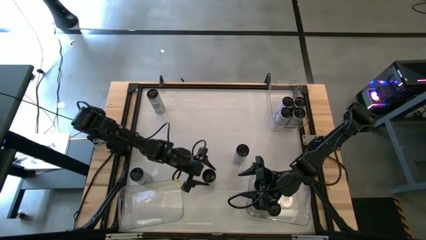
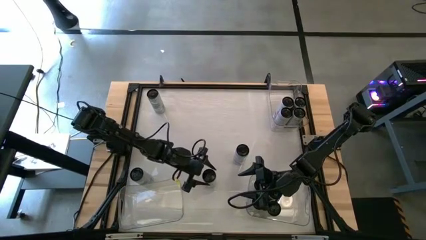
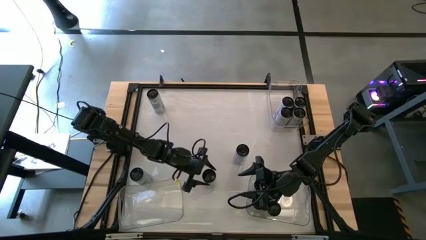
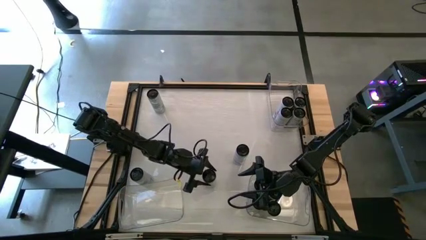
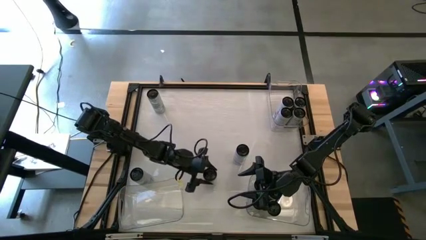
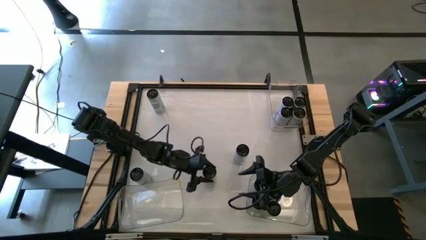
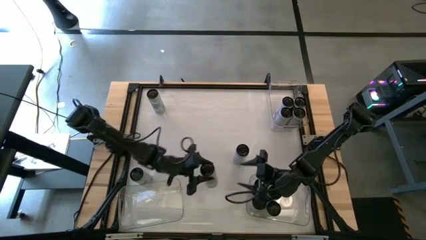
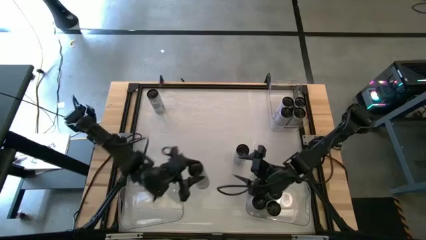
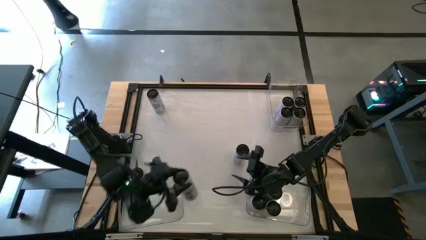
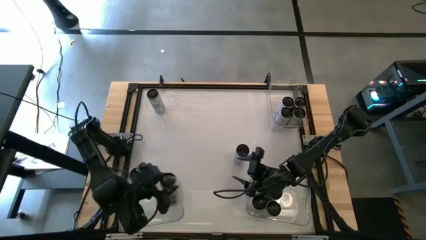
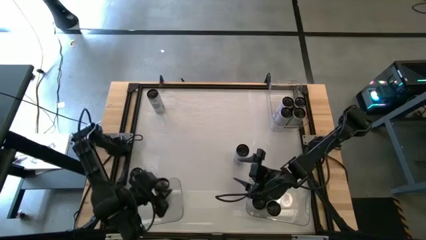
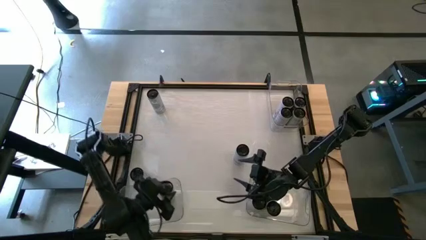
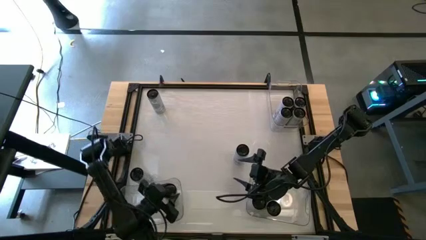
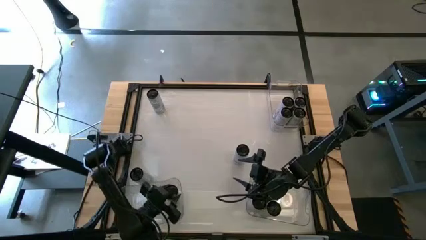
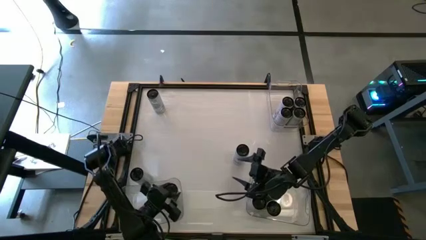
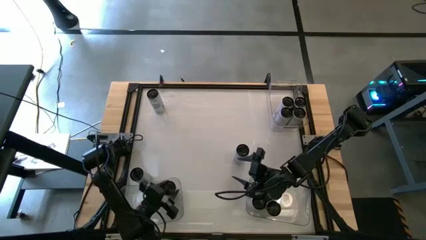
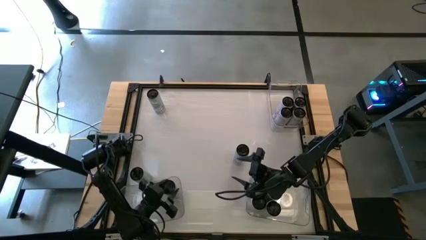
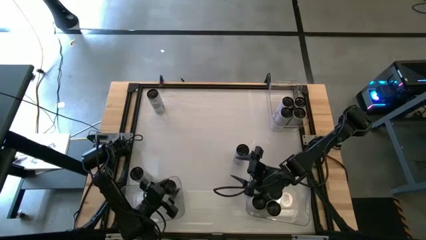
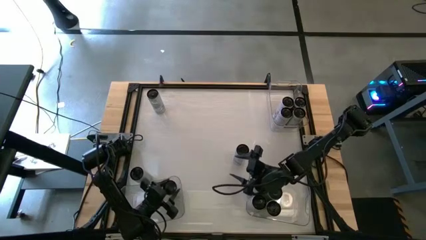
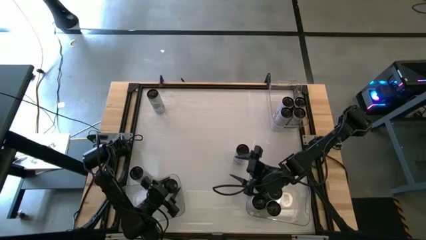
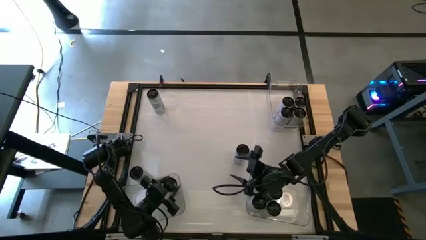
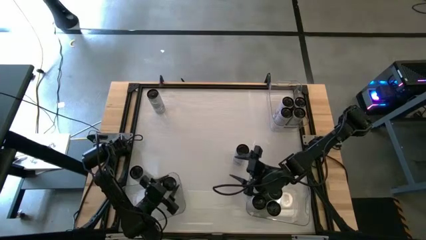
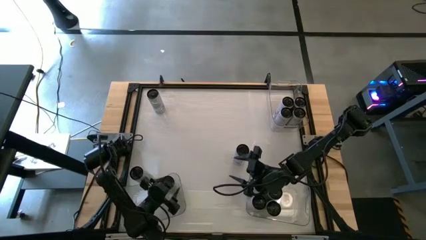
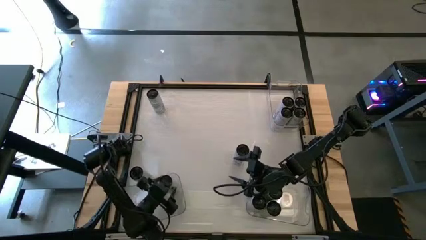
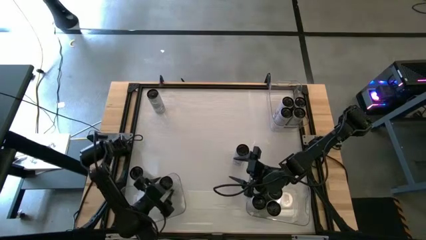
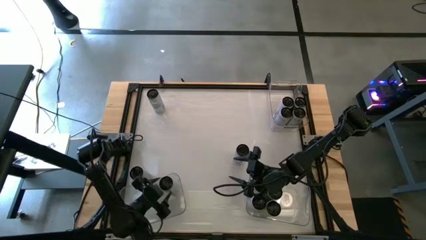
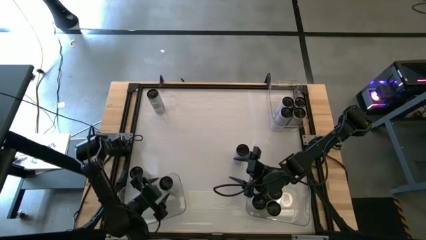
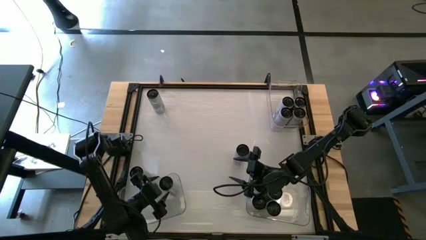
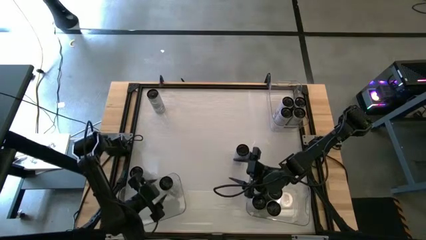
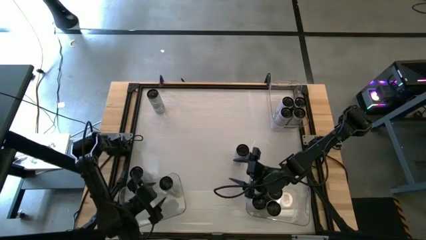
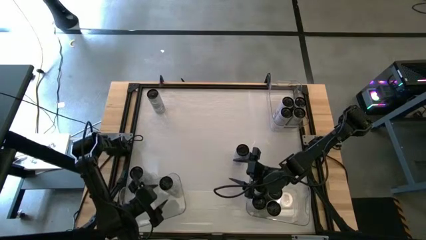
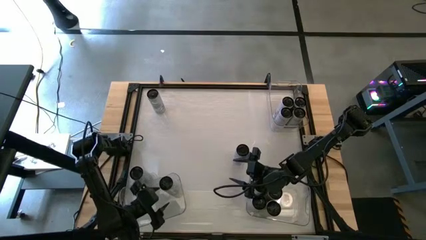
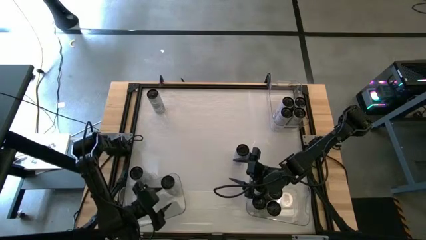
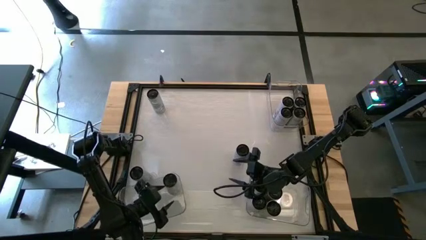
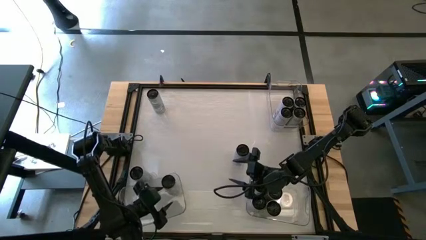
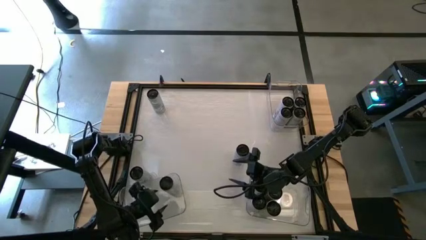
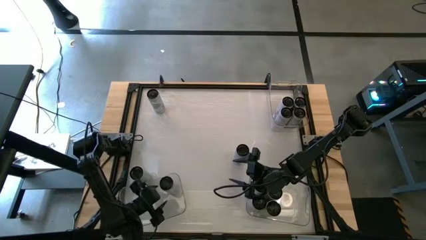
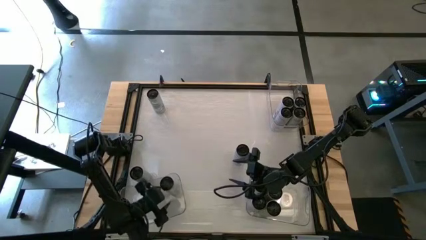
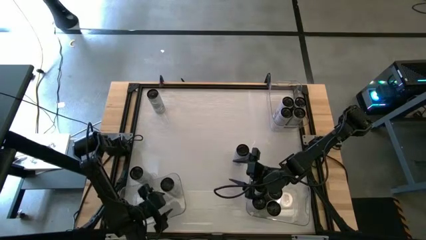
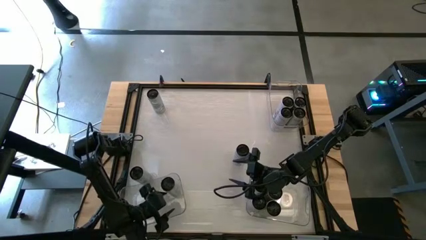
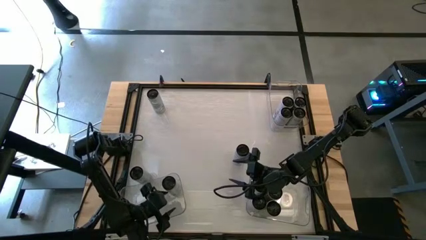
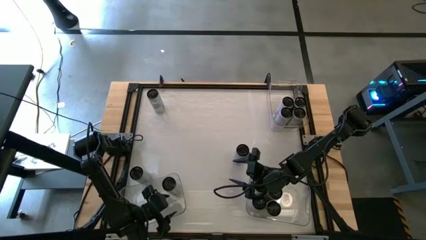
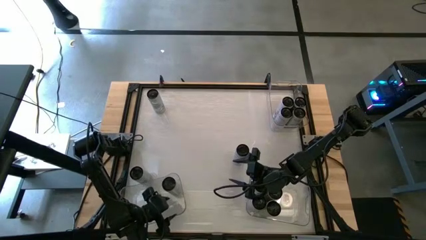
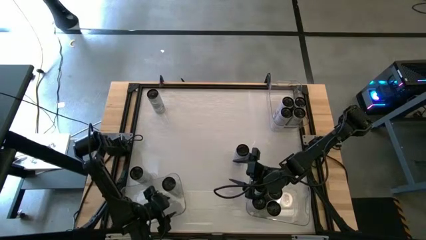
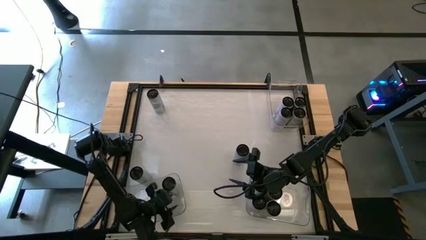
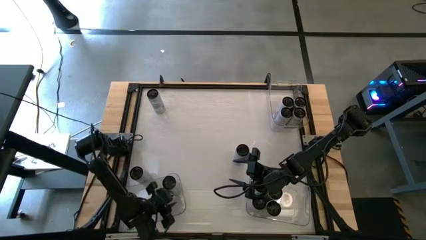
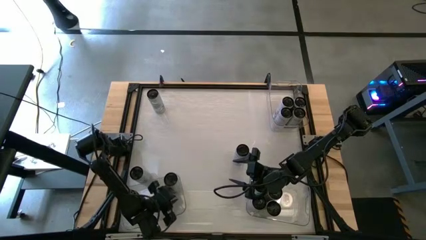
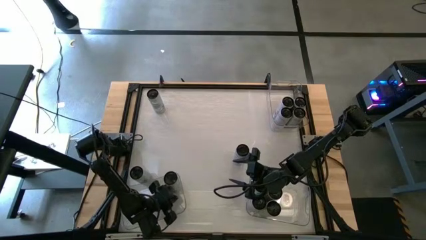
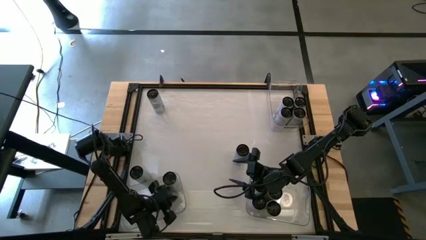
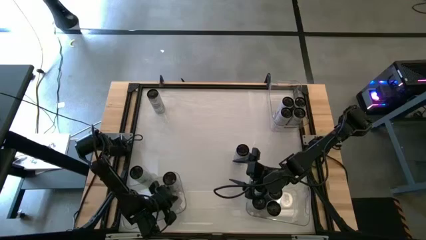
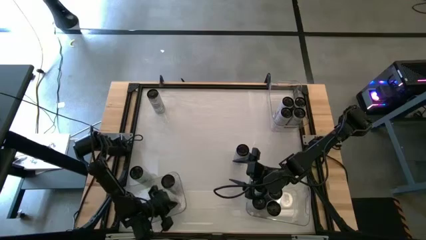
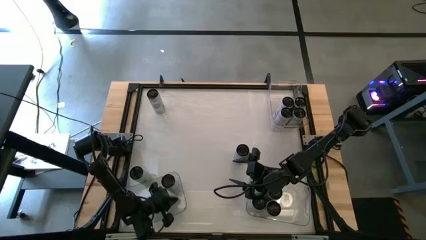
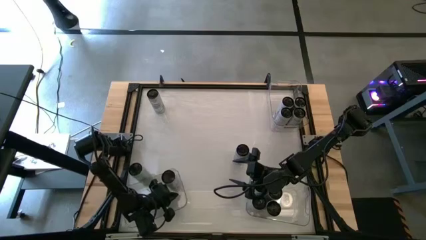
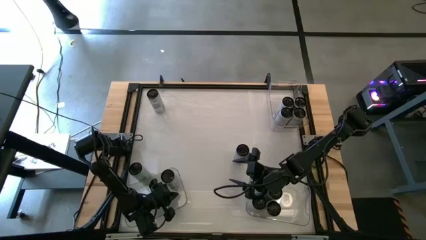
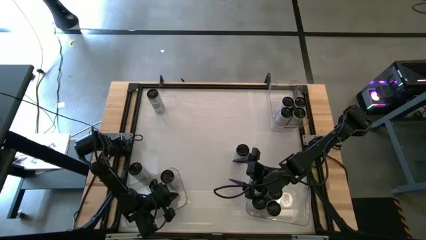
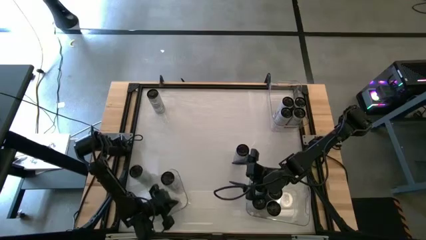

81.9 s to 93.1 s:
Task: Sort soda cans
Put the bottom white-blue soda can into the bottom left transparent bin
